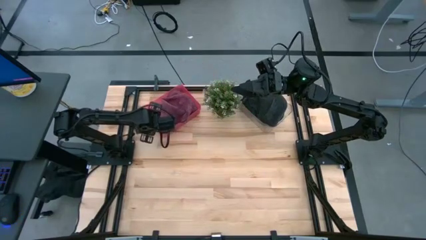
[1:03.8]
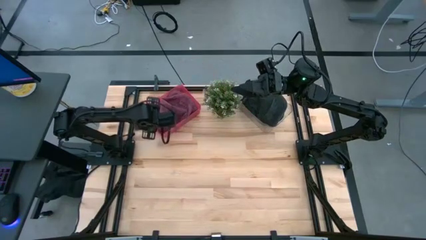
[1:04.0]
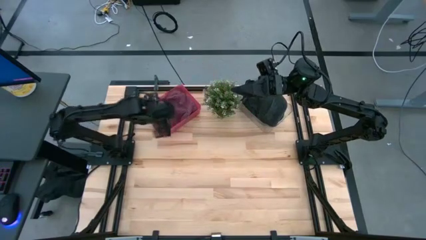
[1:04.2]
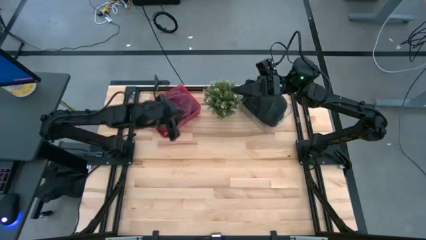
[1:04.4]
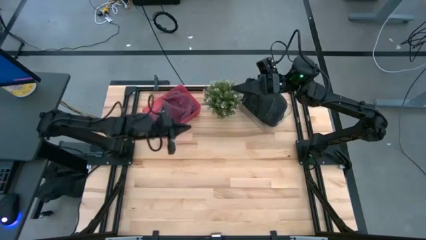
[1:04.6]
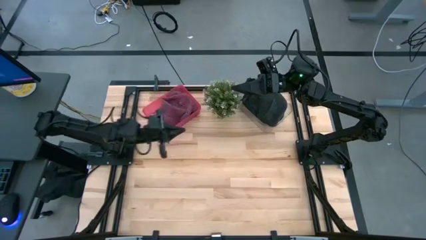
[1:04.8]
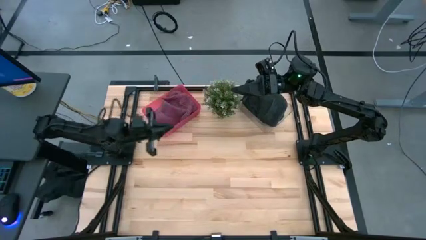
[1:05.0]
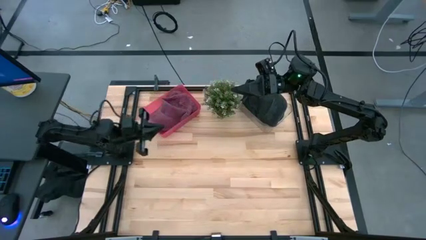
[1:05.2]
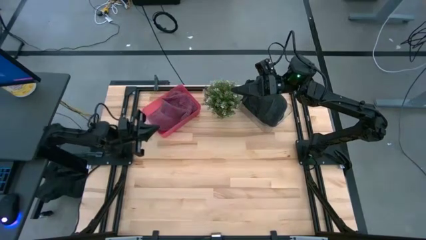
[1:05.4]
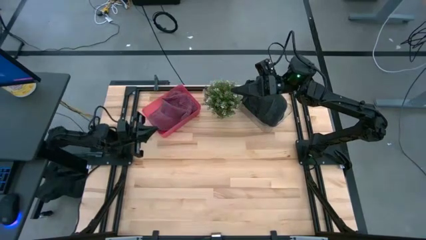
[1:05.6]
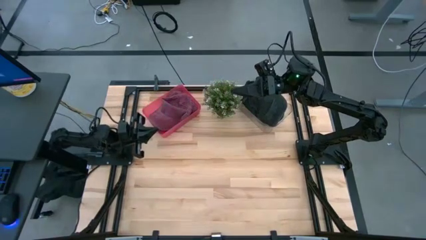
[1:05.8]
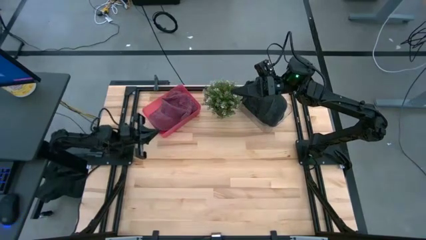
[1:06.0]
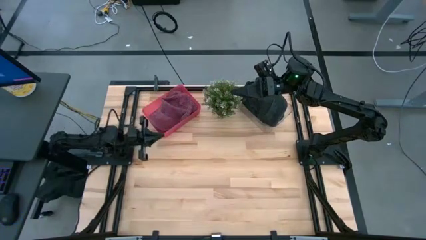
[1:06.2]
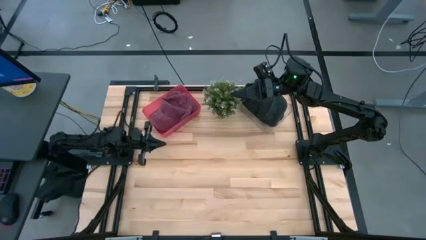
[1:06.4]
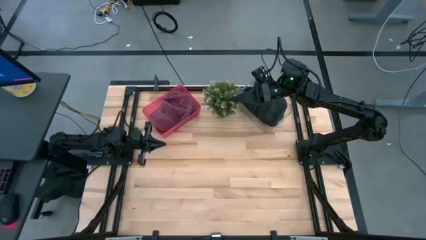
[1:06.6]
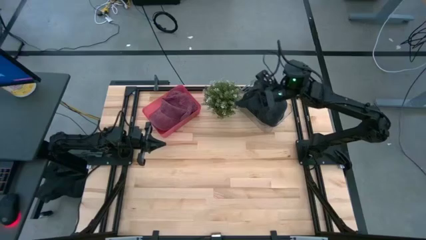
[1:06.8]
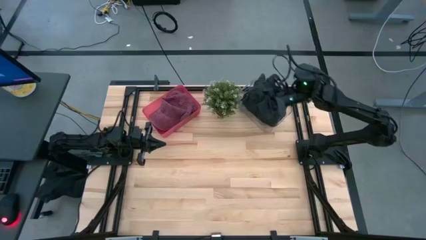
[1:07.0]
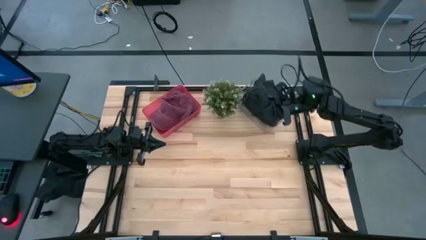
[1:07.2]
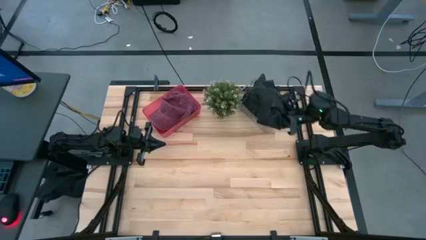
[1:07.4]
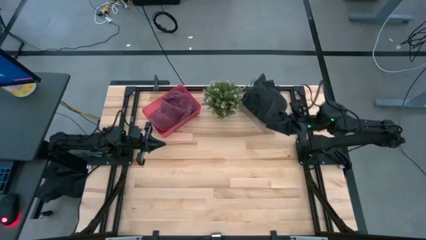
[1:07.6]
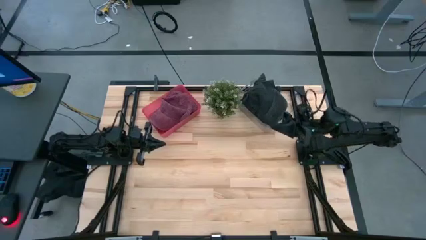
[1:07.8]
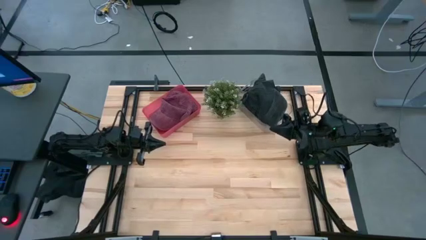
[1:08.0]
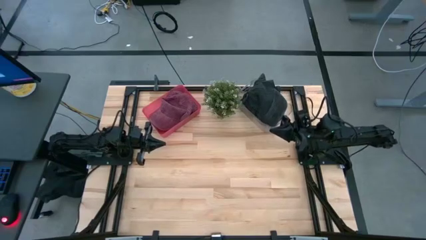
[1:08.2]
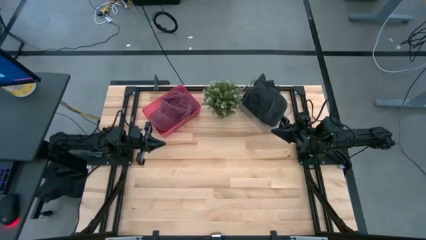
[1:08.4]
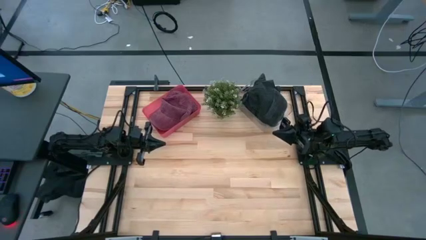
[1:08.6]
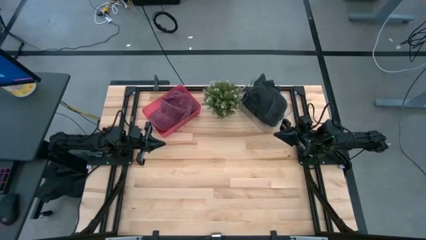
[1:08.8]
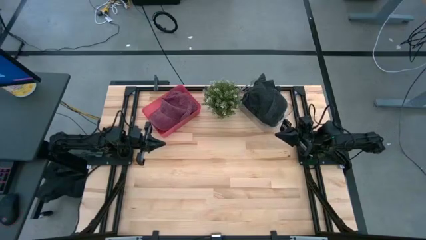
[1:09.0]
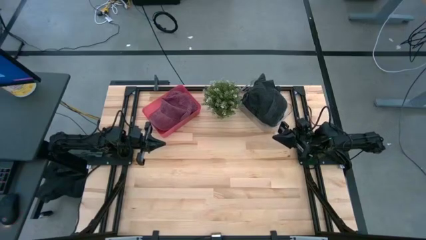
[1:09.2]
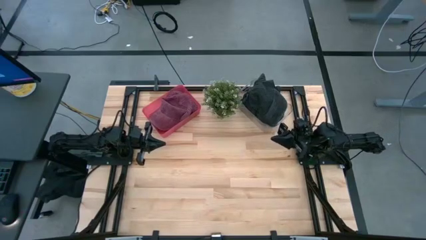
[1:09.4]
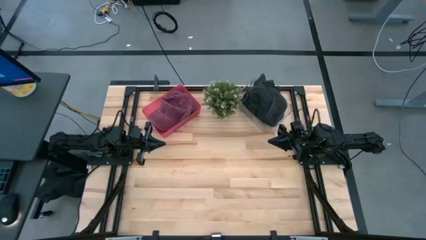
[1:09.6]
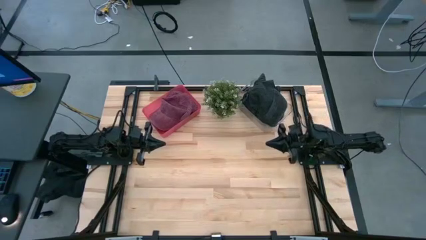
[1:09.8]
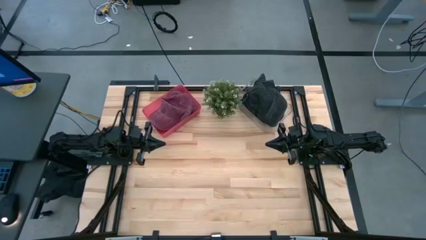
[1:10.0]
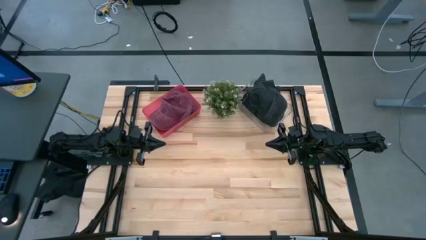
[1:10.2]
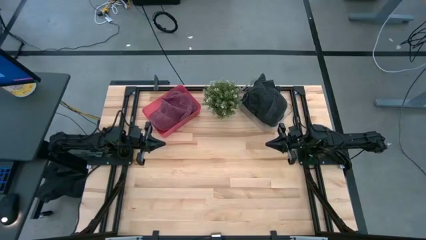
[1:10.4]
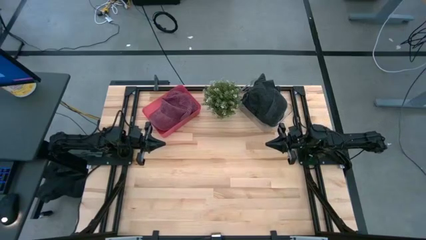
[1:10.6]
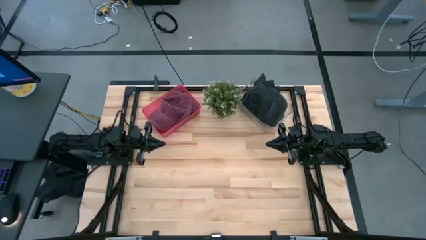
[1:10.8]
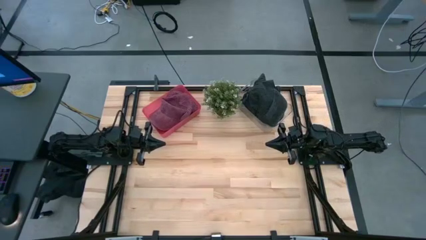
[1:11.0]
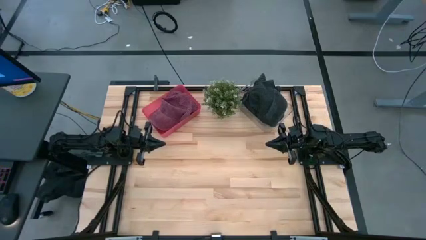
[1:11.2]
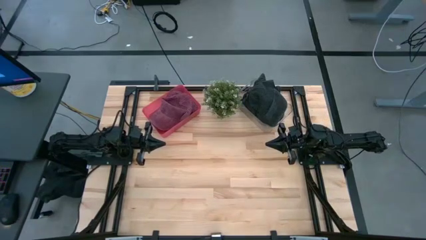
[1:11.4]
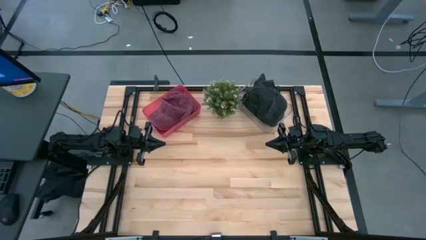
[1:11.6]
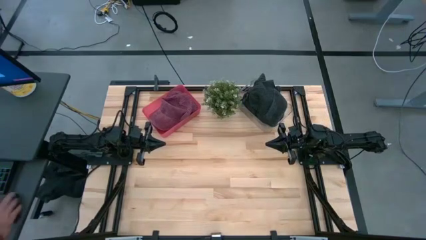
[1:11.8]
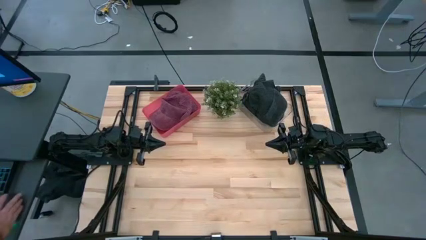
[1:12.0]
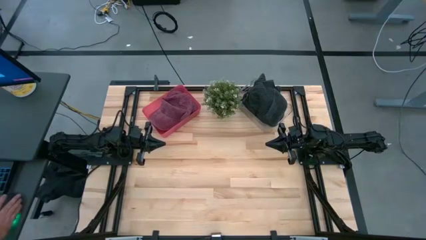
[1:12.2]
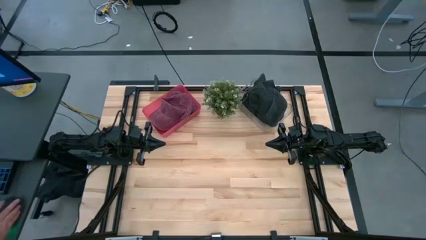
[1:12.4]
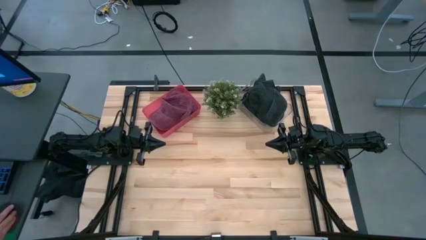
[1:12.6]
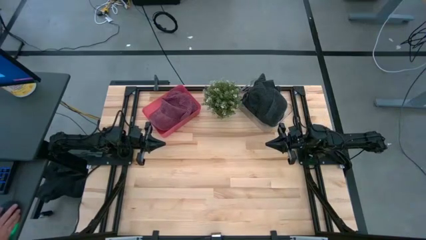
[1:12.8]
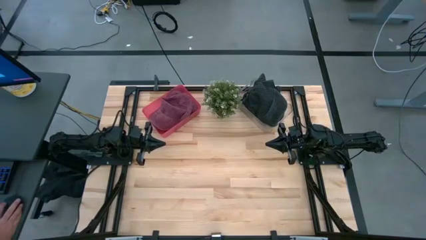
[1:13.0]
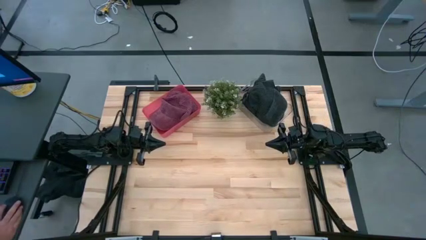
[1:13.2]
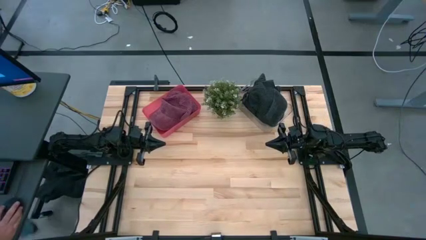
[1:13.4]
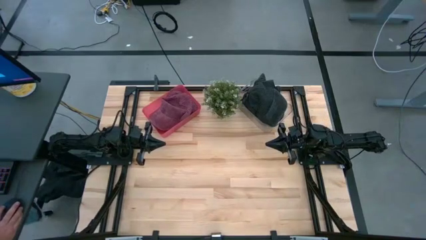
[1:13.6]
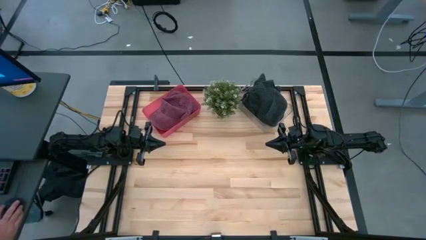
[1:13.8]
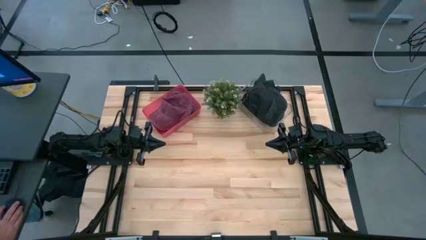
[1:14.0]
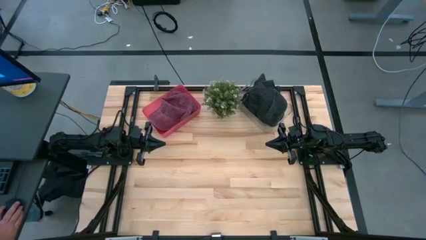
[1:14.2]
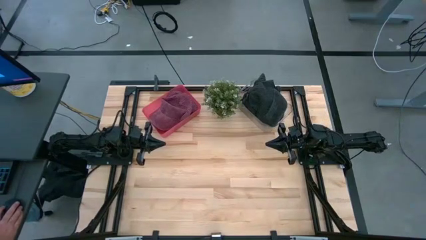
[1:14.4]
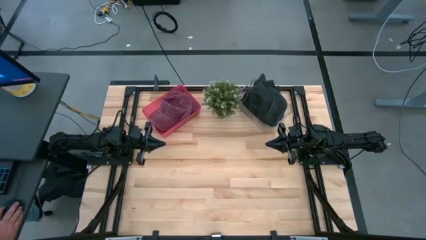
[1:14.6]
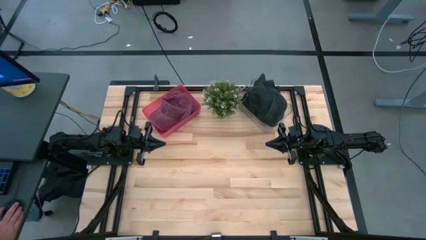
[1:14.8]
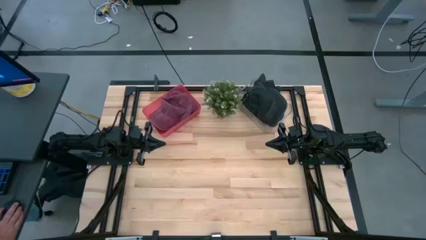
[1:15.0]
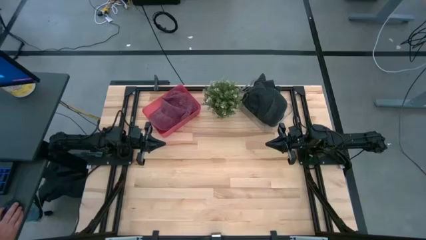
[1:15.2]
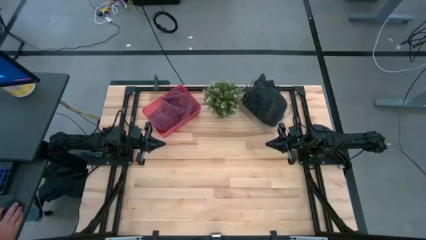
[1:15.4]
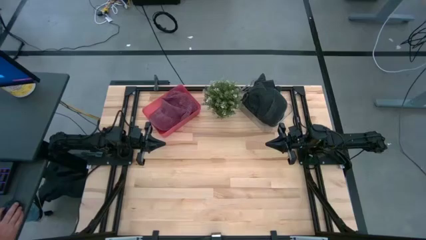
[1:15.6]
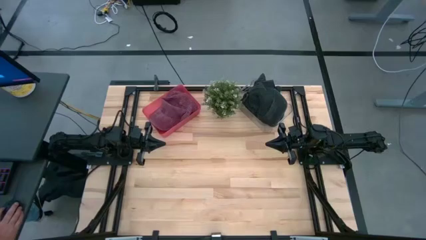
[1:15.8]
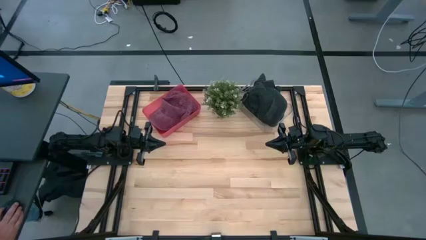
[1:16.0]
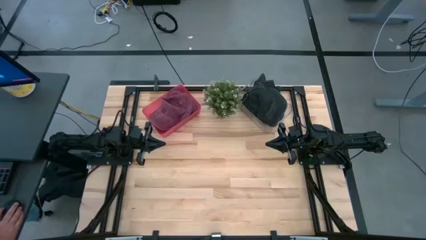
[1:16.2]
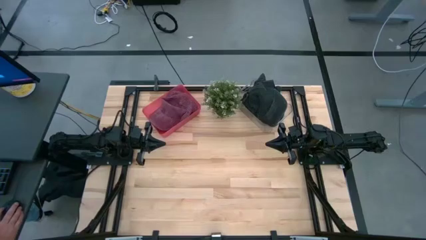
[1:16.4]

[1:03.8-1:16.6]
Task: Pick & Place hat
Return to Home Position
